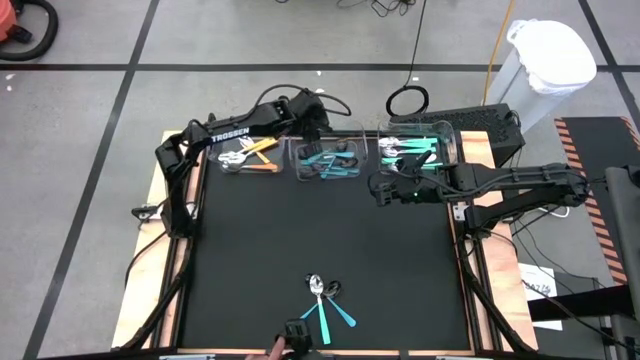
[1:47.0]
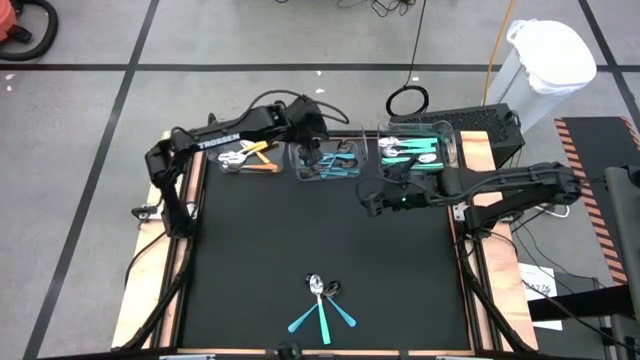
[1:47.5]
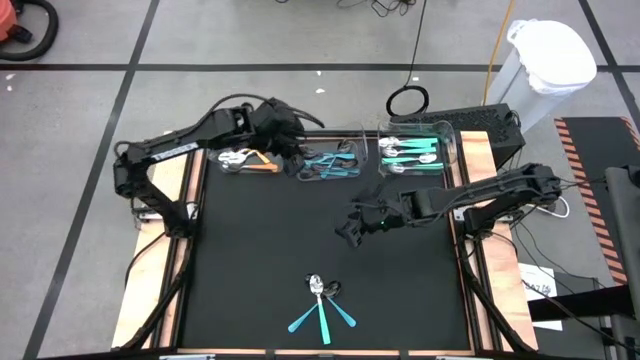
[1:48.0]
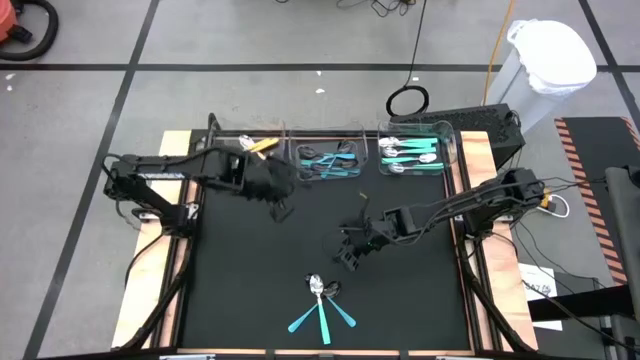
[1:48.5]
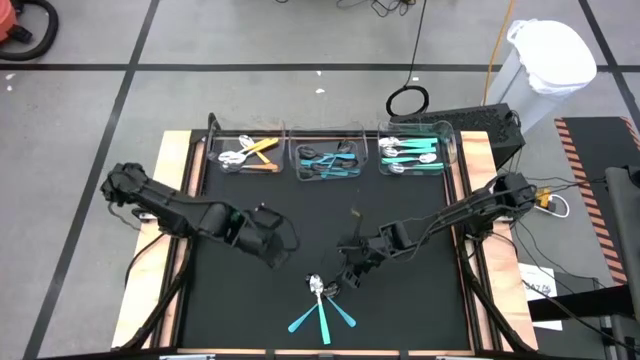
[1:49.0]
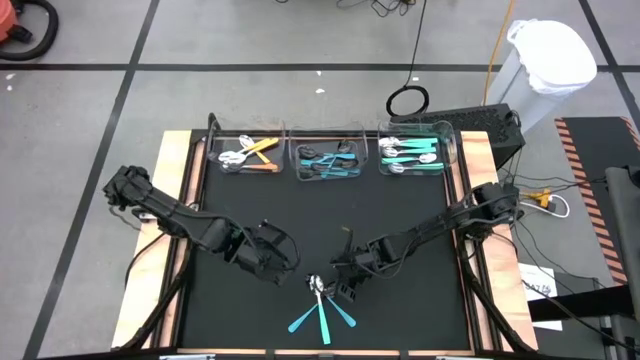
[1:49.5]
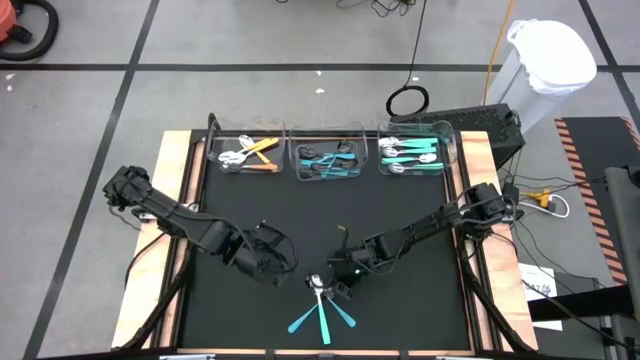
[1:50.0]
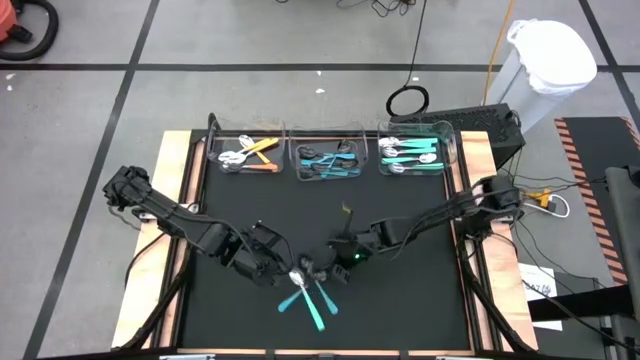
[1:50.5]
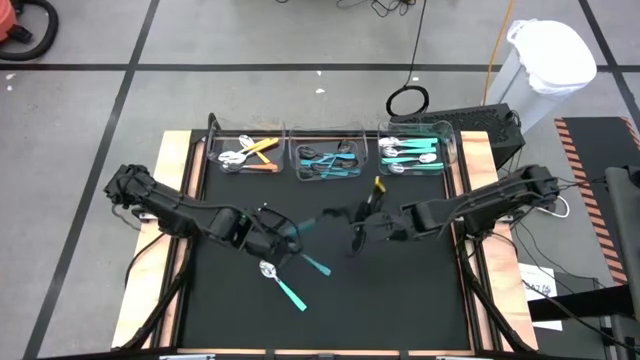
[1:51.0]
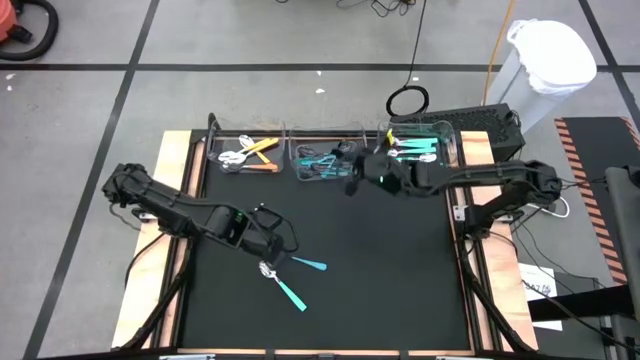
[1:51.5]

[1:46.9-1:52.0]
Task: Sort silverware by color (type)
Put the light blue spoon into the middle transparent bin

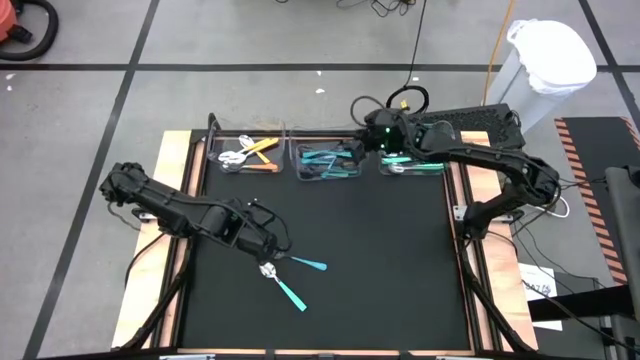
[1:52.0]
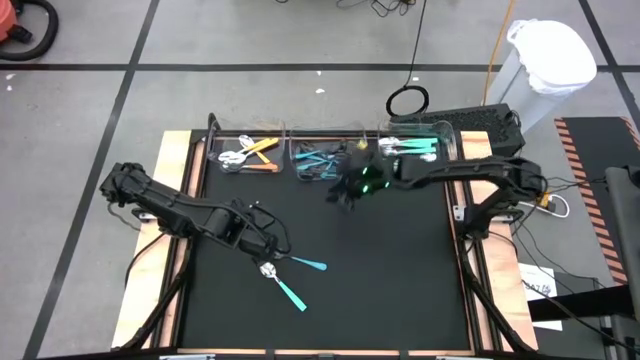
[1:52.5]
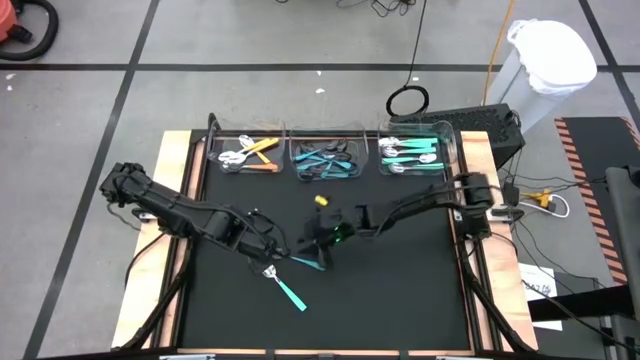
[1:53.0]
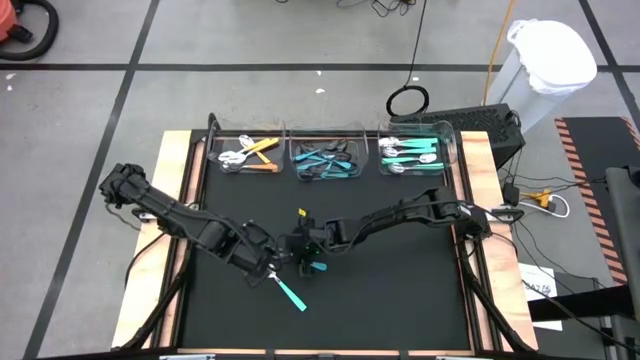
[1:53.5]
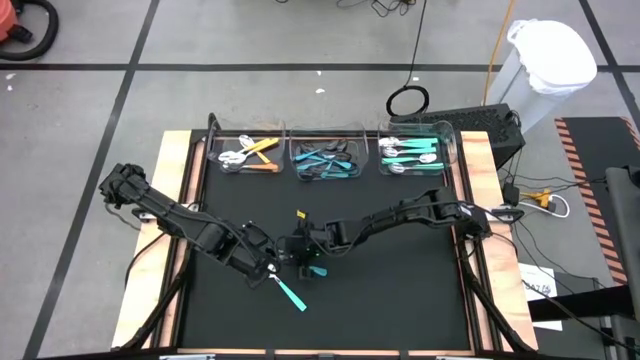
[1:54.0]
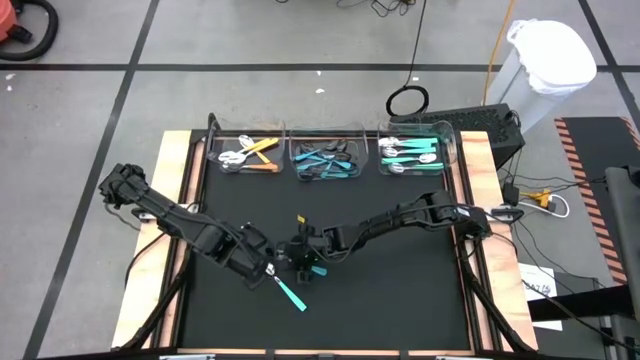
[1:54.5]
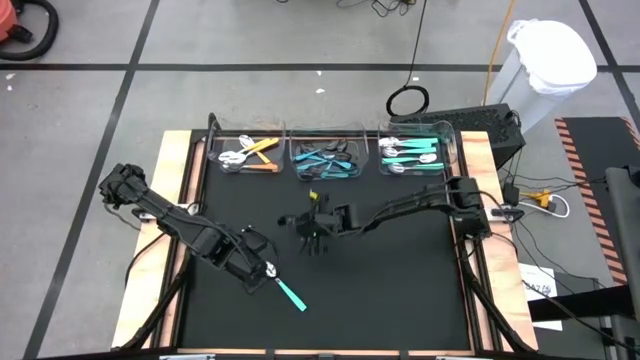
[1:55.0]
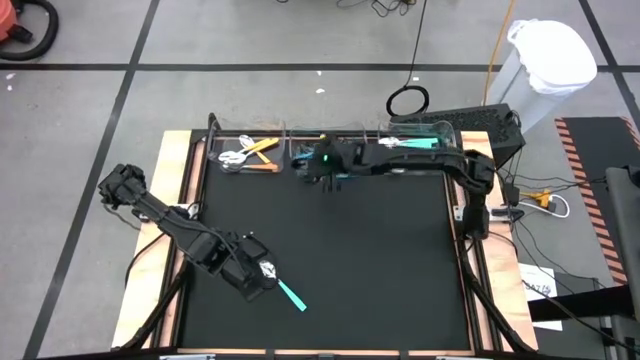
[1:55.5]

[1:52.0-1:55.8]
Put the light blue spoon into the middle transparent bin

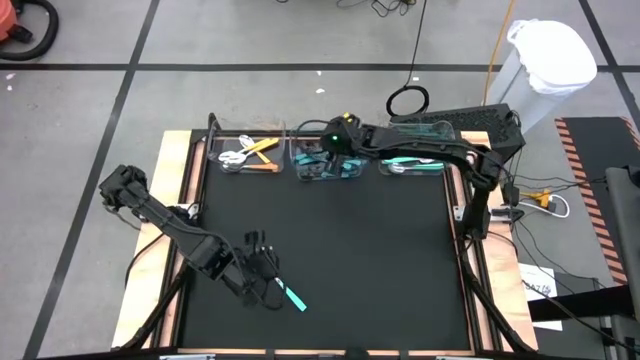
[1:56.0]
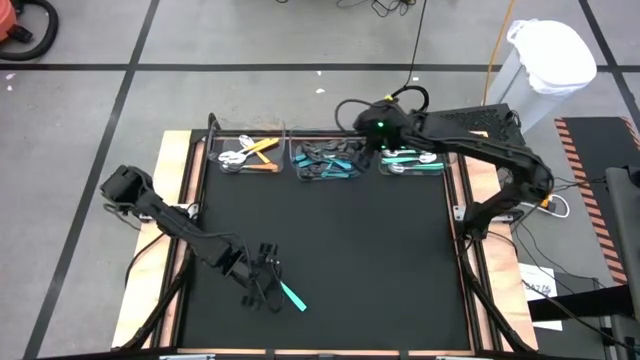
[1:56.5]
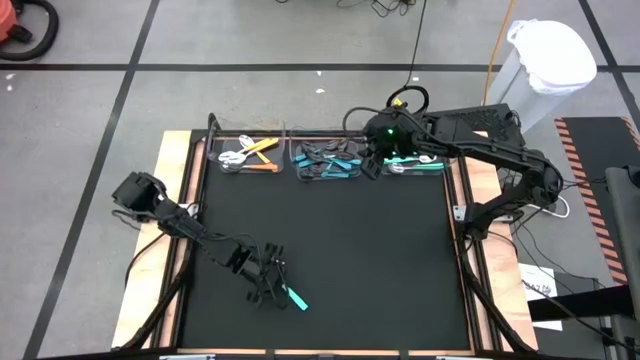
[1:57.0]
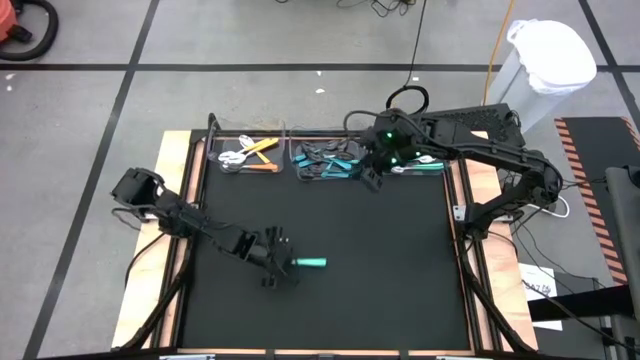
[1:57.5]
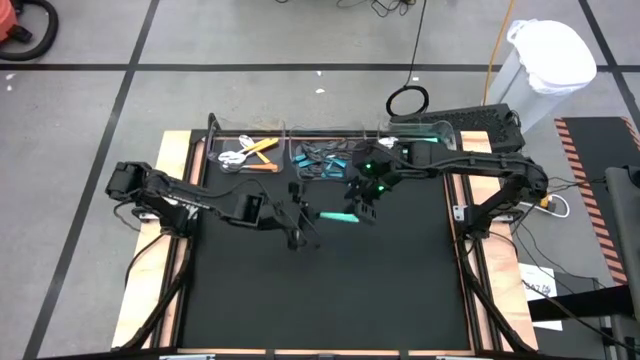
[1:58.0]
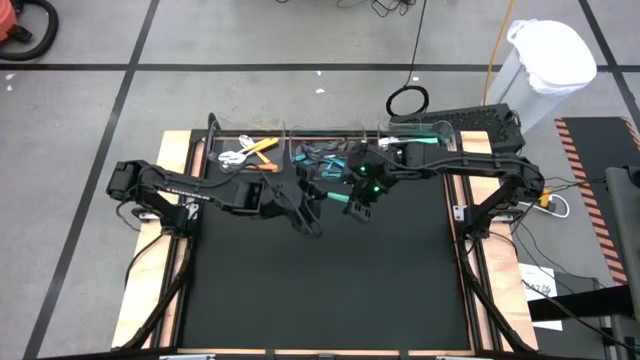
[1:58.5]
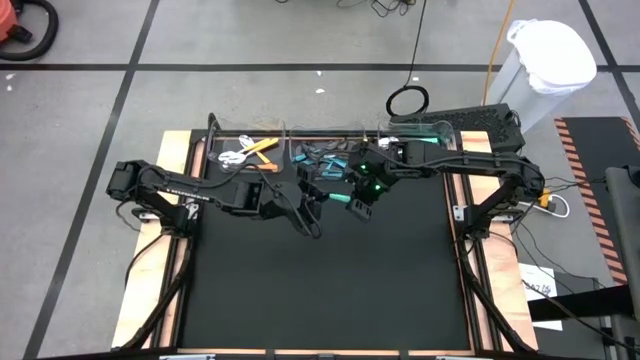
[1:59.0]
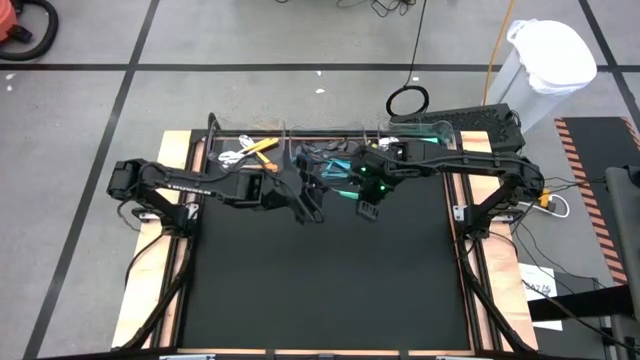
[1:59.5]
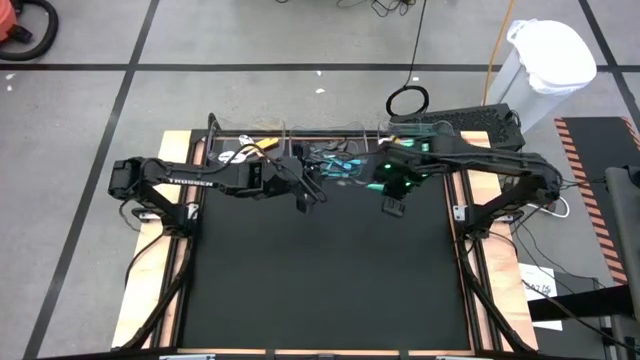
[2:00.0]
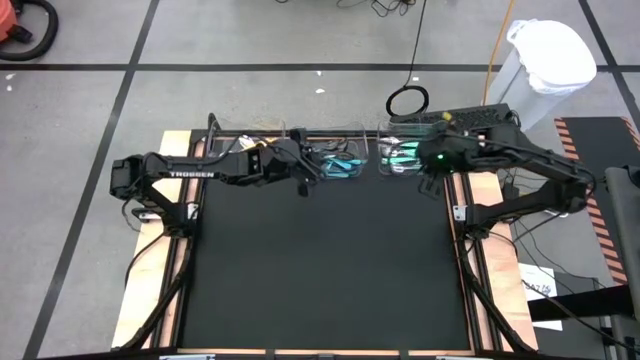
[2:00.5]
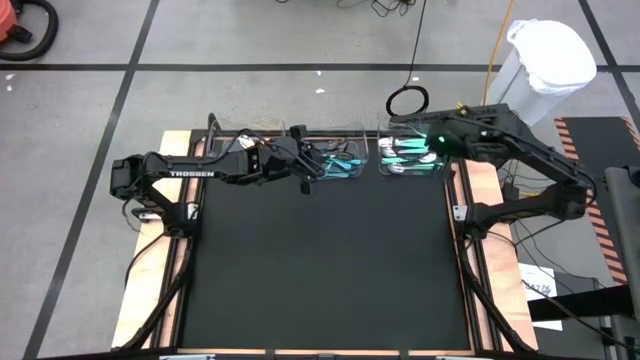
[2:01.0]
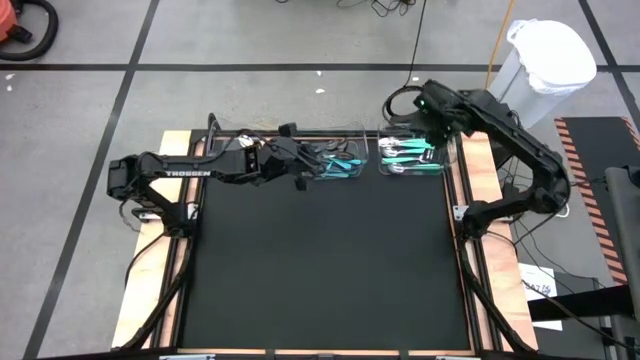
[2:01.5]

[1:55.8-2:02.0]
Put the light green spoon into the right transparent bin

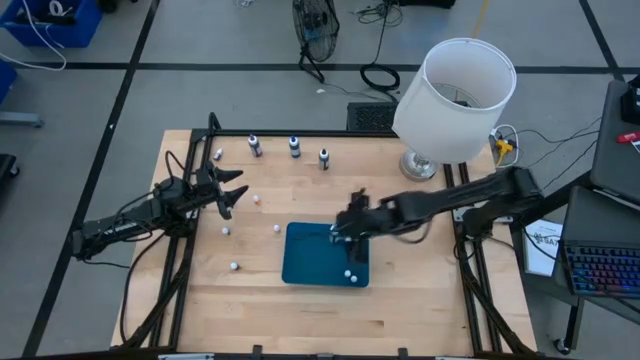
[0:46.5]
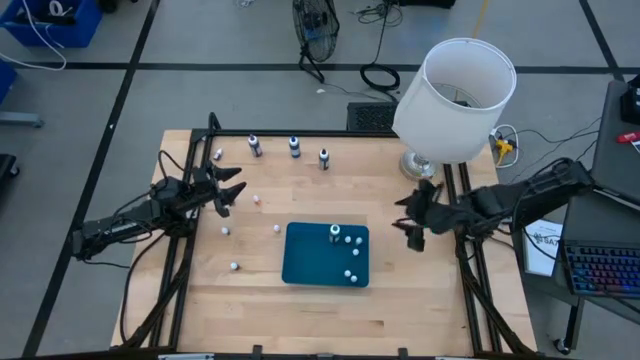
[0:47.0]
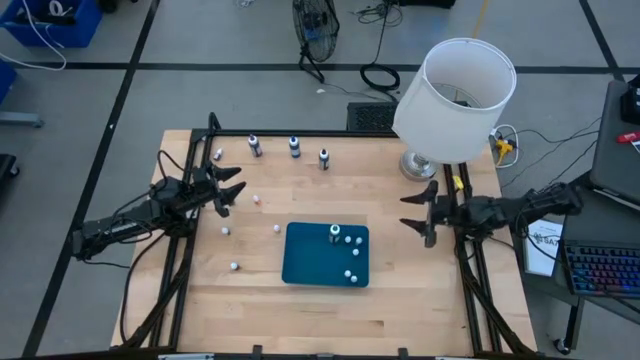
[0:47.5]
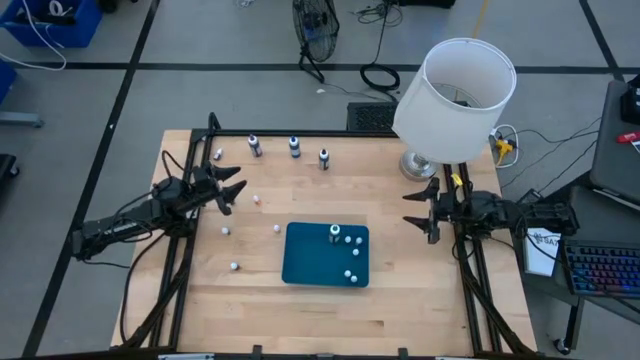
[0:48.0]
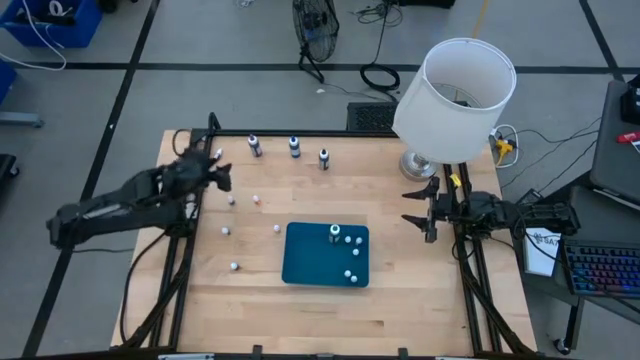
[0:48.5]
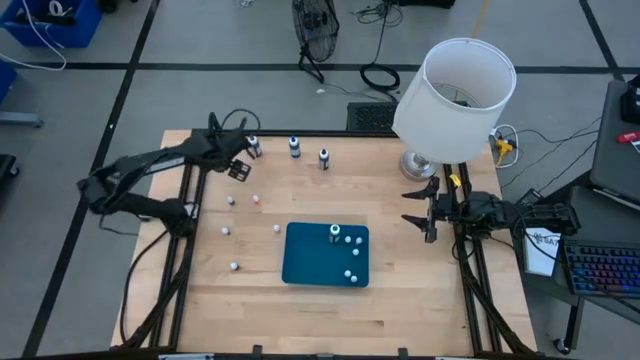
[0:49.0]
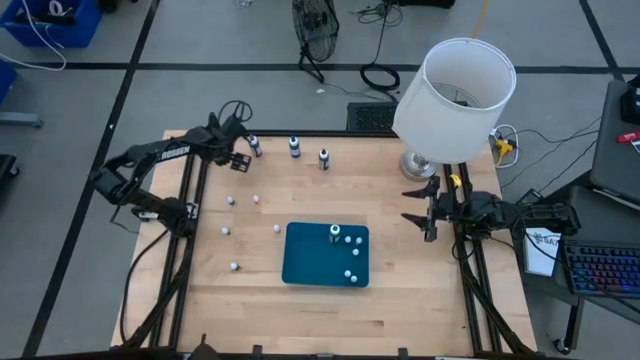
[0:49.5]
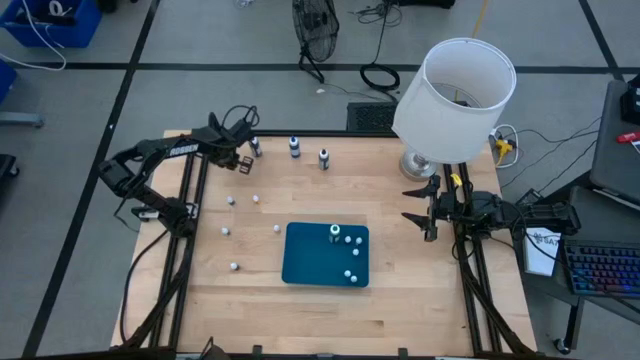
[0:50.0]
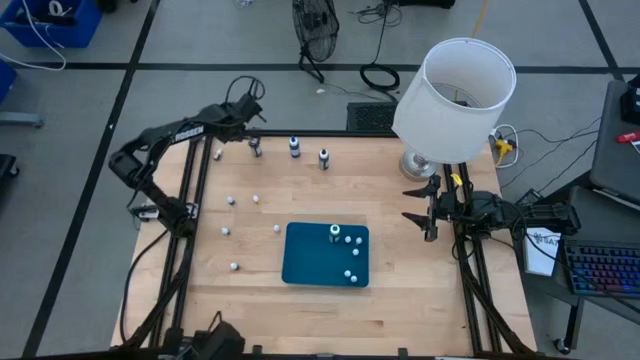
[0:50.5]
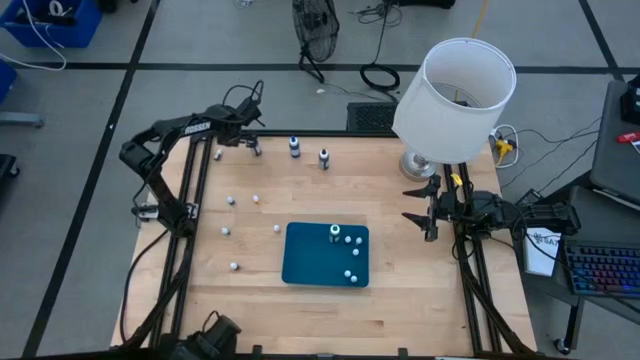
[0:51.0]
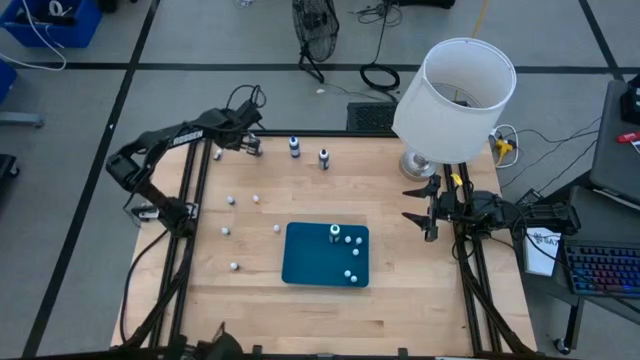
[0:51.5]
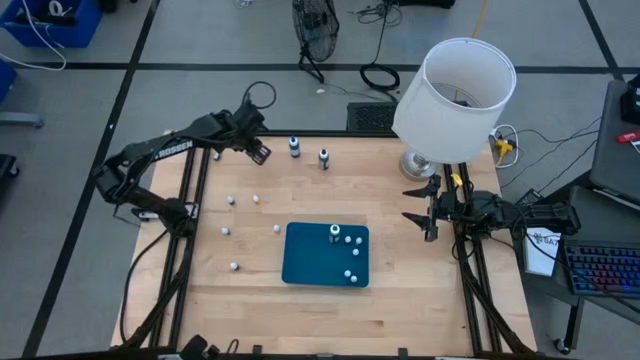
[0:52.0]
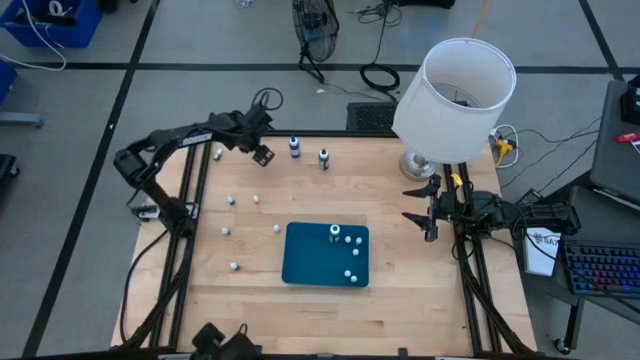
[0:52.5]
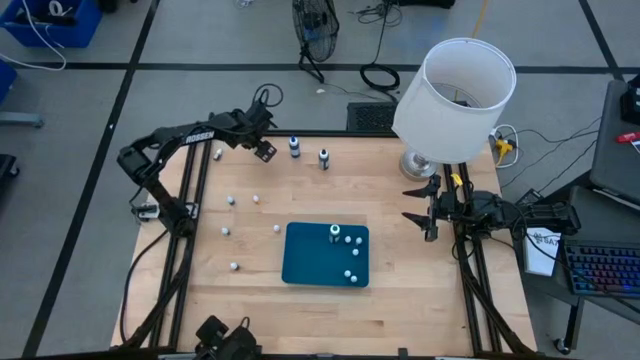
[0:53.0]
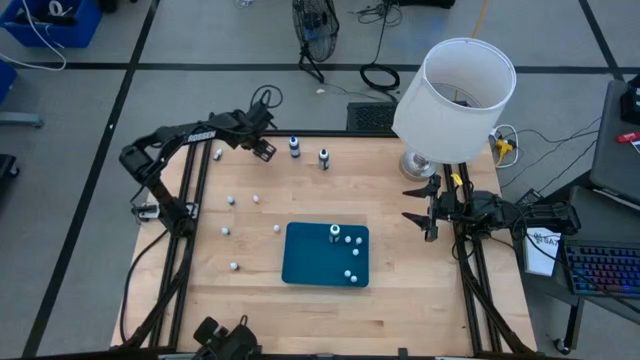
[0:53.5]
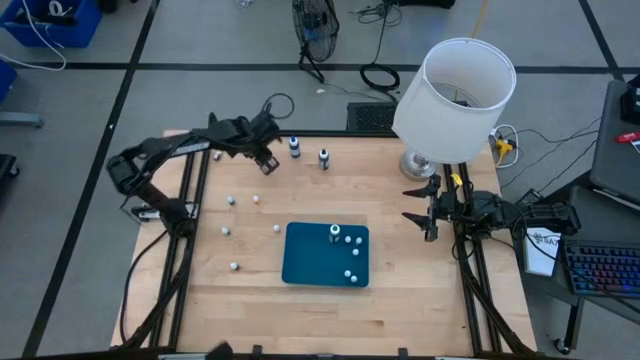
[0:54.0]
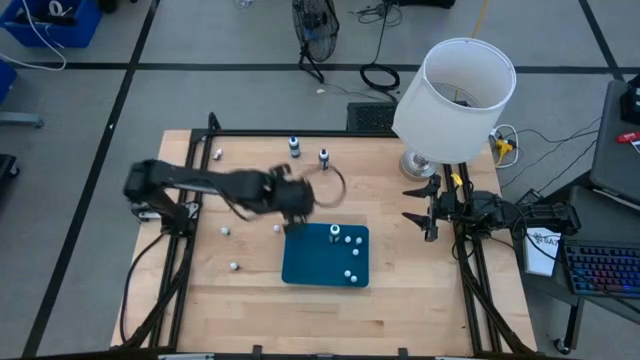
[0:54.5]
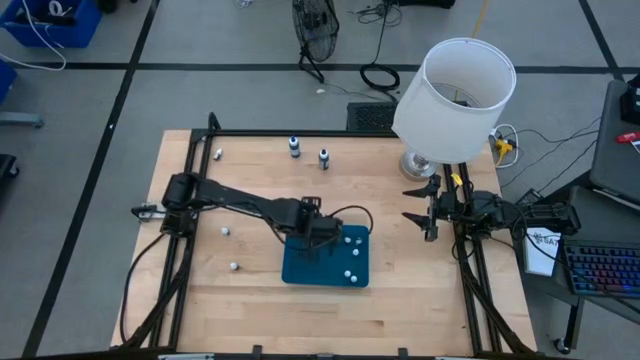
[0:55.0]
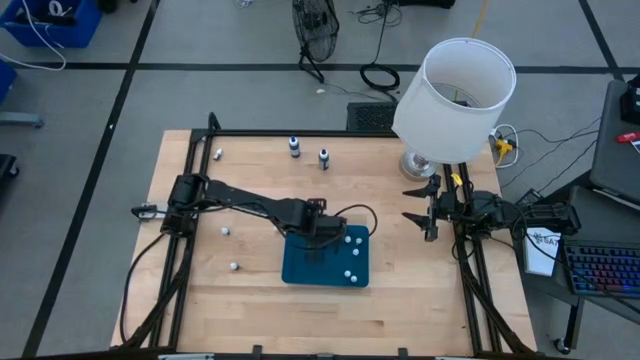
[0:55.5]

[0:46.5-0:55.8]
Task: Pick & Place food coloring
Put the large purple food coloring bottle into the blue bin
